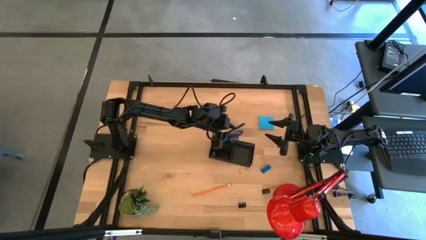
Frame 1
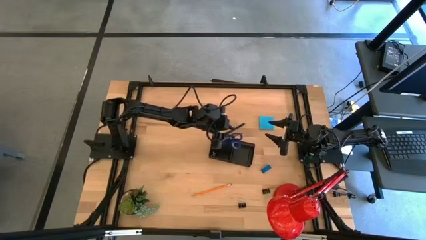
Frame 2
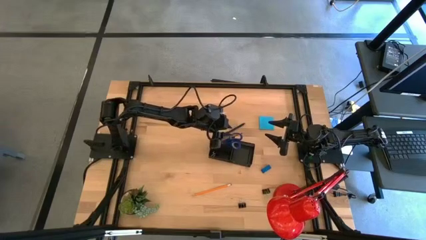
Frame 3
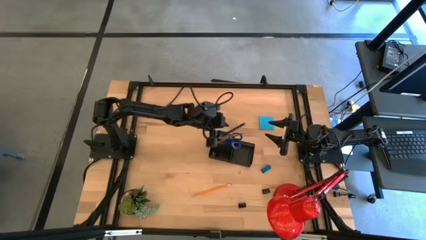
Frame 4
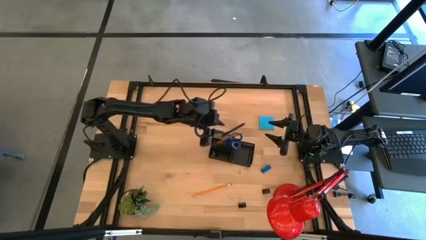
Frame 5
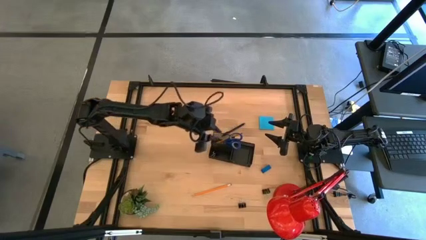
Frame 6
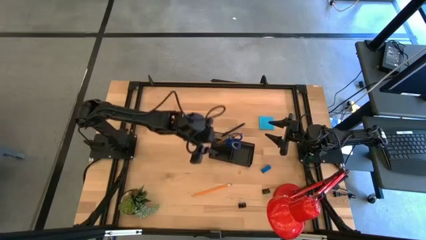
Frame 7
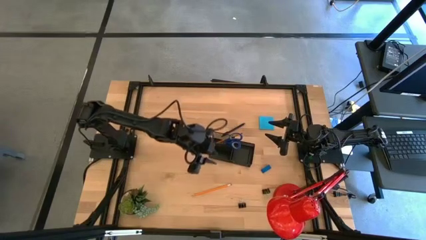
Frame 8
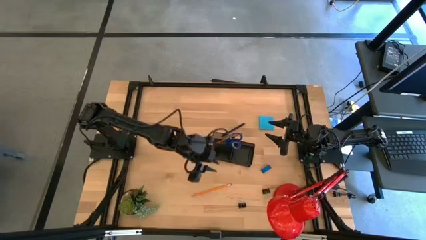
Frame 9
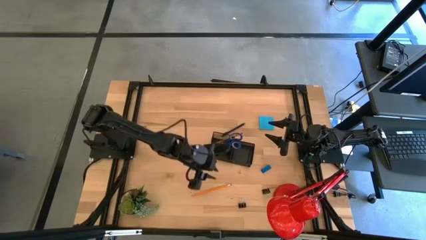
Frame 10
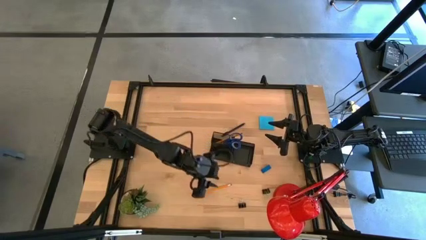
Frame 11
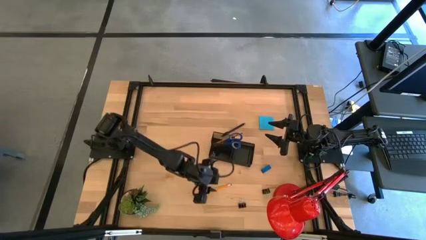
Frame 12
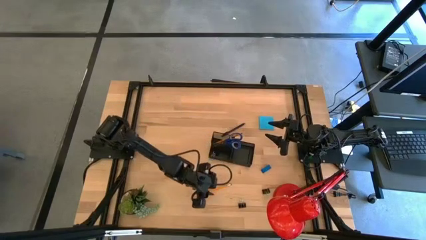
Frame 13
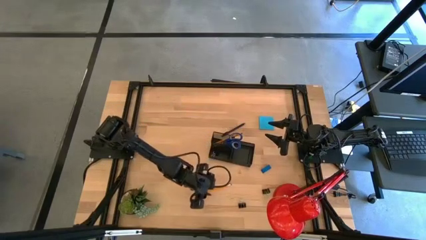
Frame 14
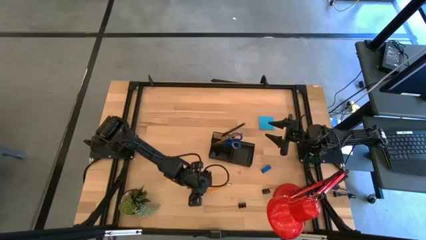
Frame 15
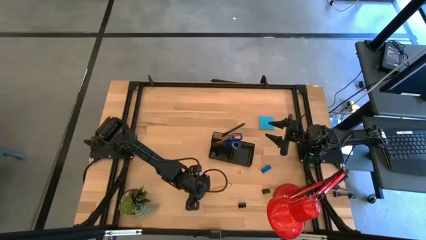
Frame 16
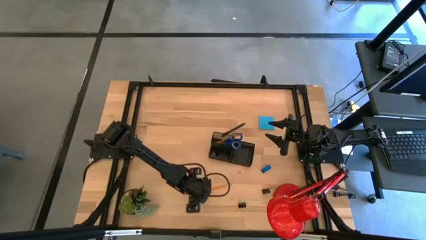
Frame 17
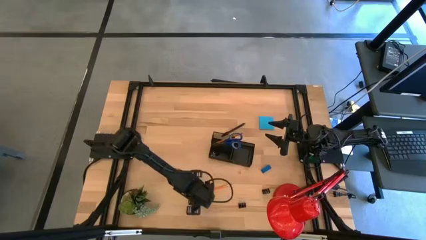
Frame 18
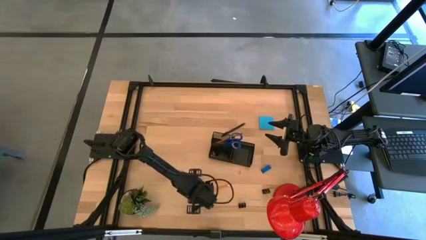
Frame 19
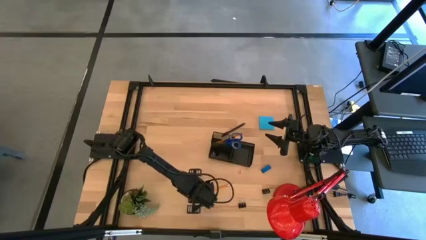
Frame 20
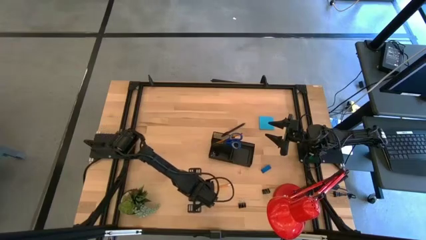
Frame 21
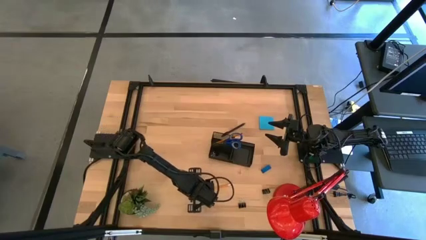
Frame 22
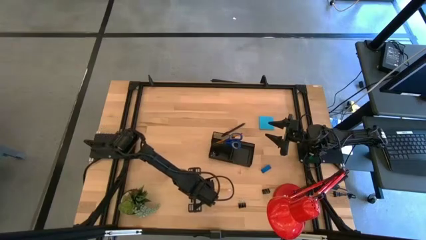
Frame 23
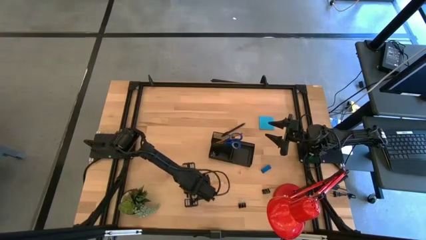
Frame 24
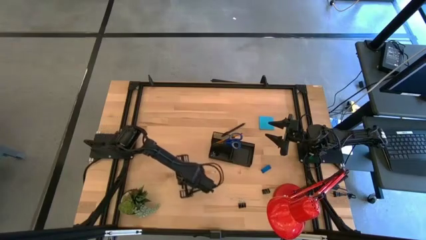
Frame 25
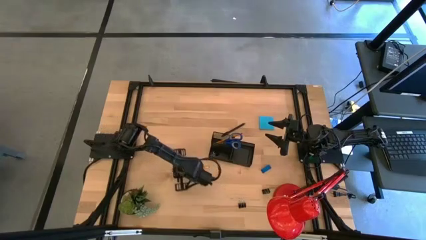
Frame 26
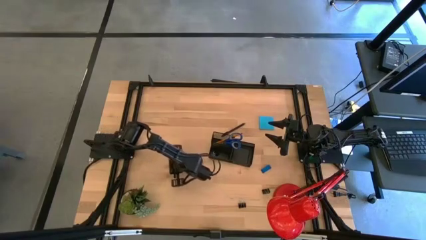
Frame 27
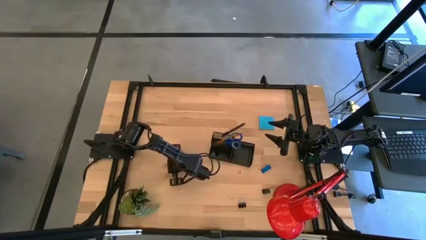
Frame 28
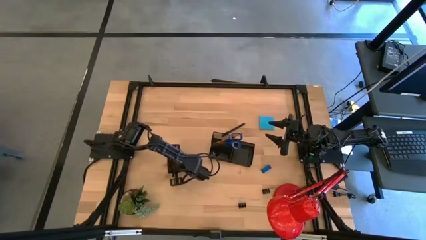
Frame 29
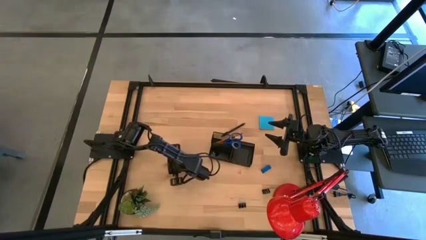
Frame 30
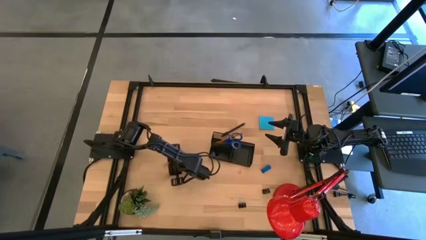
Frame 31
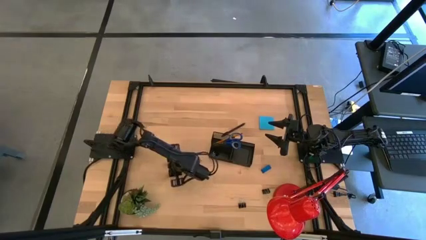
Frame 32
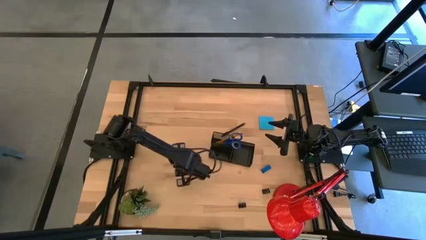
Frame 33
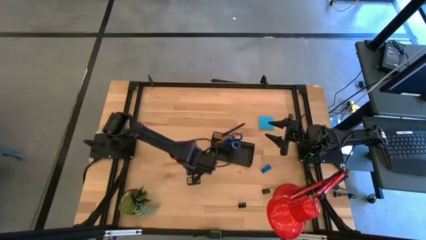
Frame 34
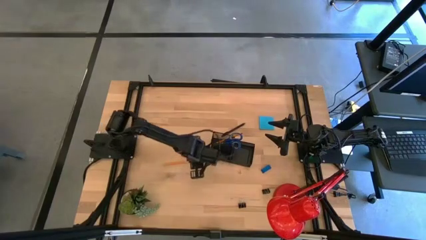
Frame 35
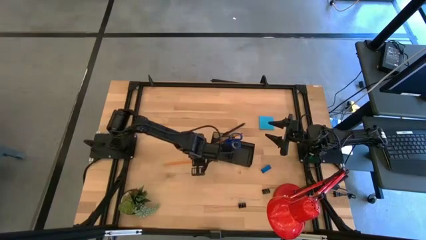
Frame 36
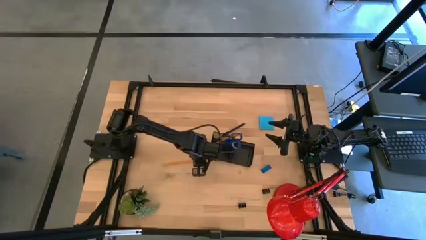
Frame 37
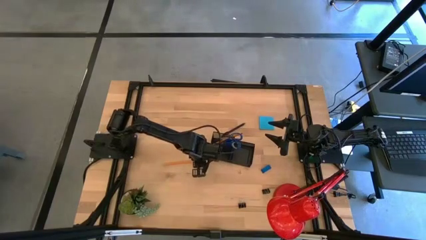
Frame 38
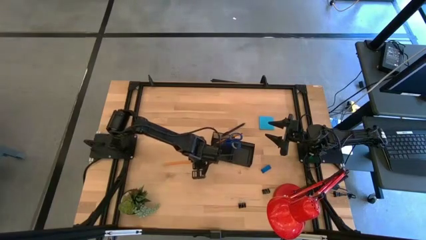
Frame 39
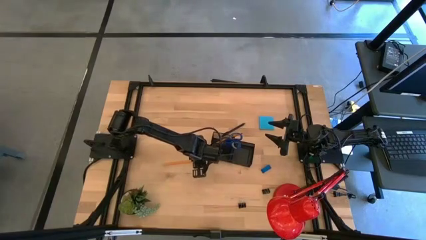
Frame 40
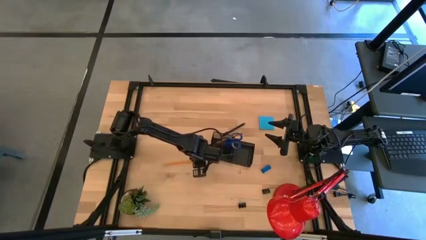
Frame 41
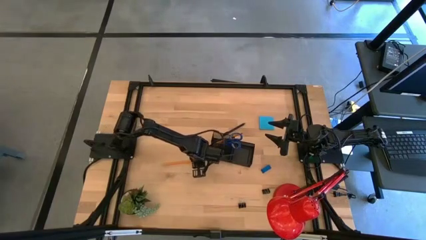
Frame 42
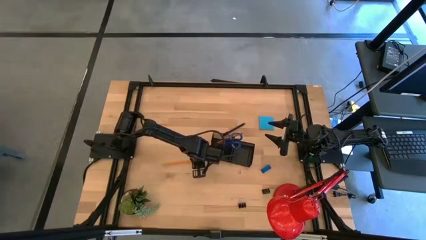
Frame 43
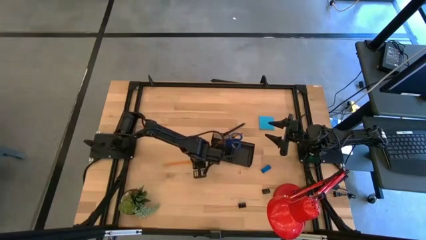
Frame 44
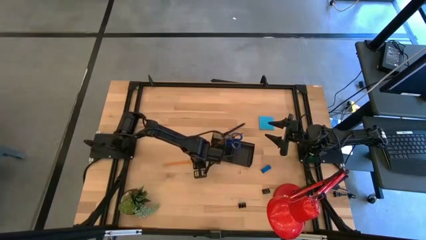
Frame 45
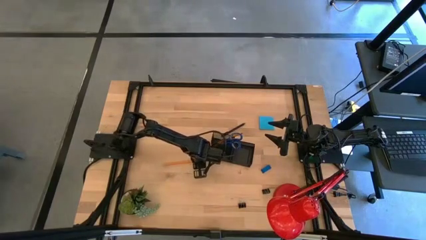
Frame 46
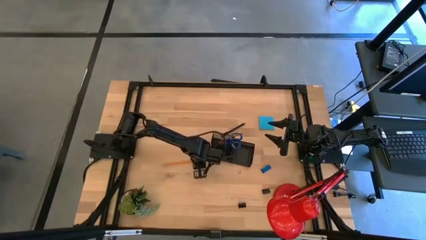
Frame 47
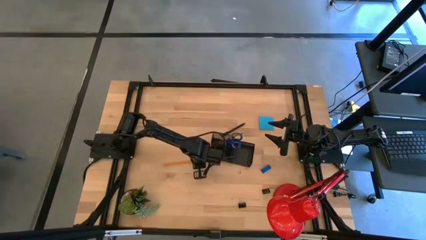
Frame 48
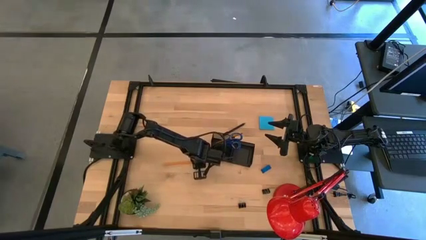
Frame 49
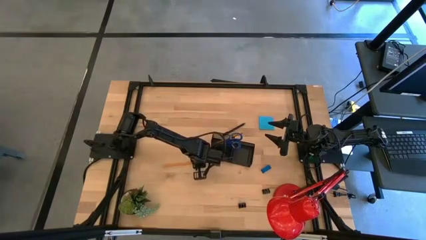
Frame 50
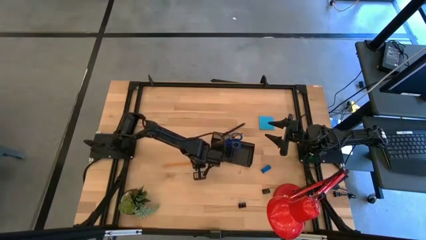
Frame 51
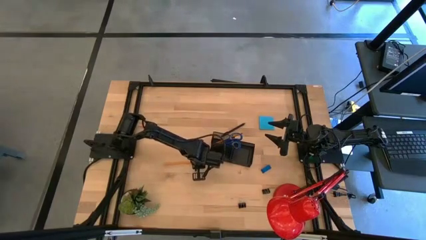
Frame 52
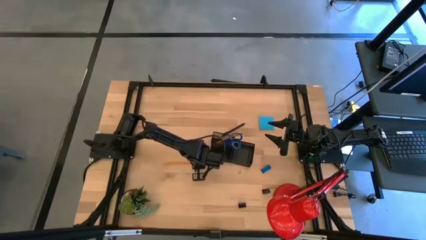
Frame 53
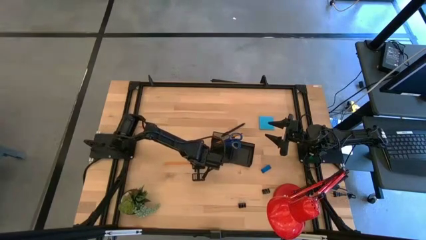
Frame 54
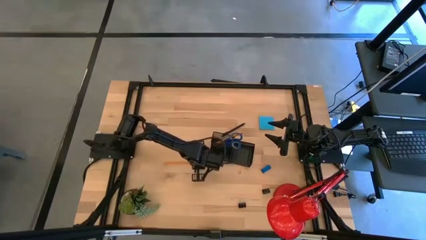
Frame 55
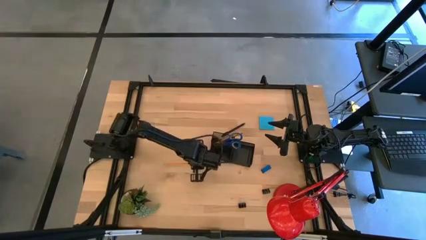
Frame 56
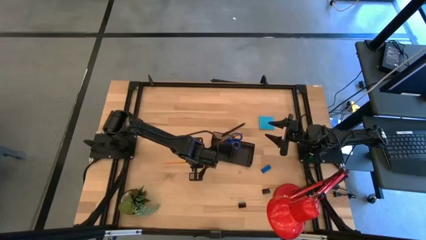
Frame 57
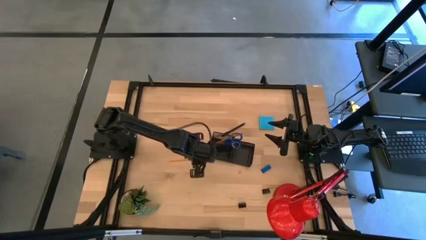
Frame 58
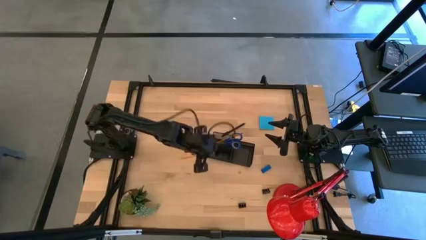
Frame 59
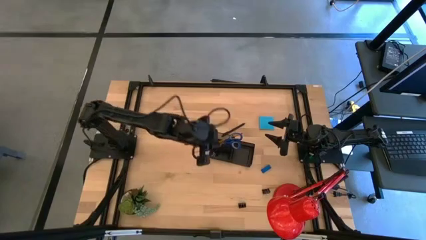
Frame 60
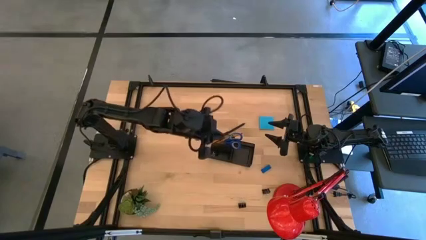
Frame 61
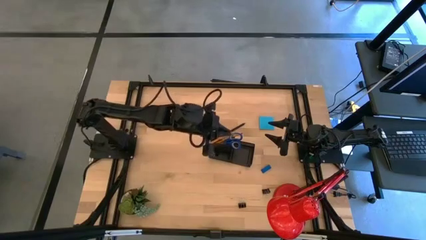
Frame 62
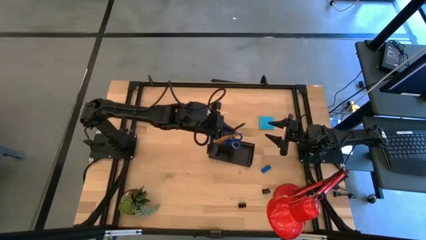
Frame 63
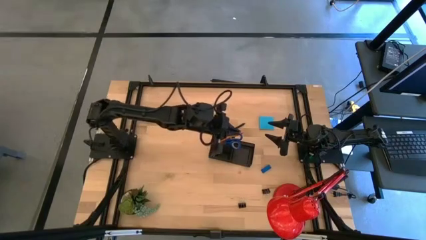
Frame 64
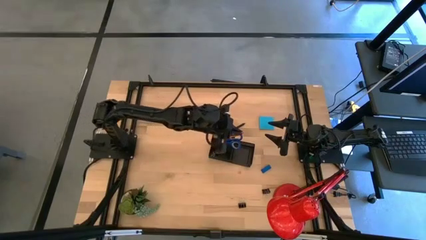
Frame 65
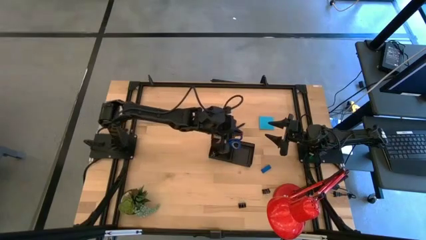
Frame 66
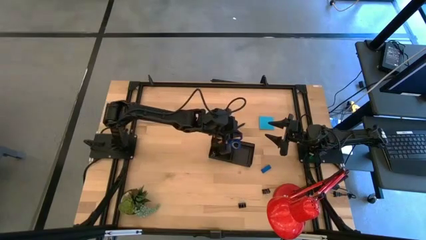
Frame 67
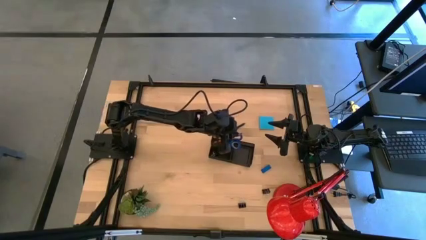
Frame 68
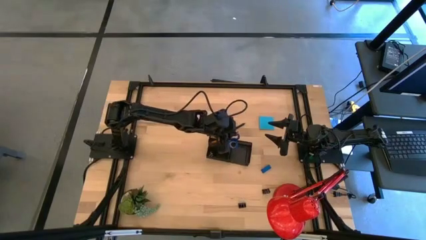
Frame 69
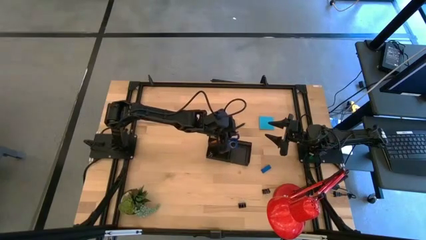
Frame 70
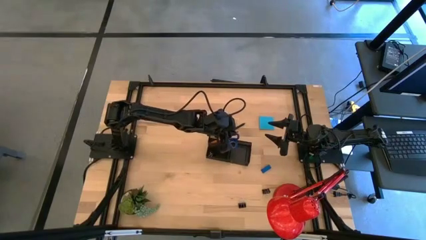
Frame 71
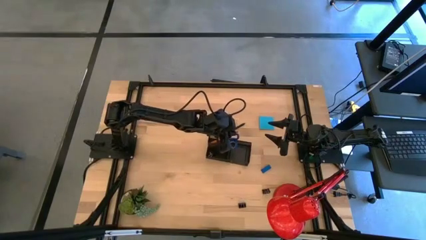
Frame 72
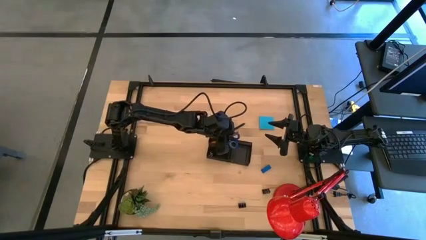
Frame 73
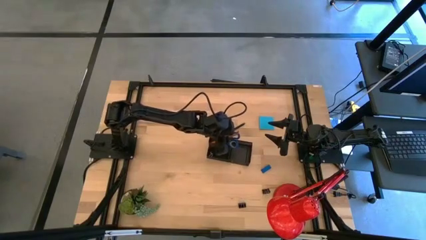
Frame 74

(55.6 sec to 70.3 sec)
Task: Pick and place office supplies into organizer
Put the yellow pencil into the black desk organizer

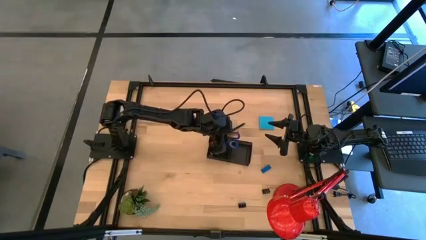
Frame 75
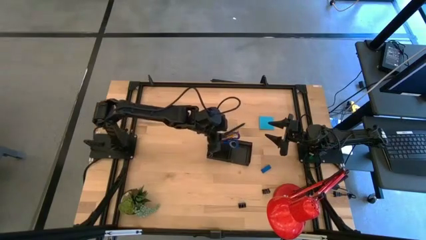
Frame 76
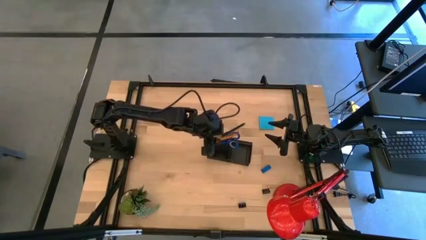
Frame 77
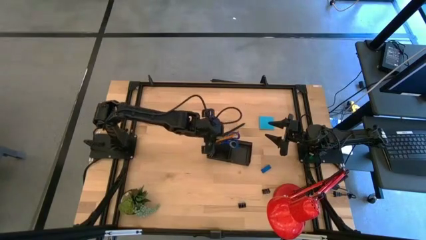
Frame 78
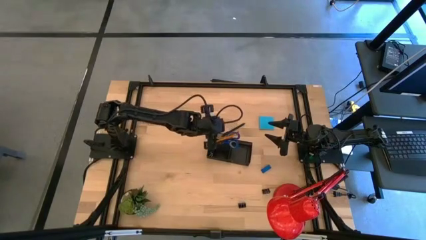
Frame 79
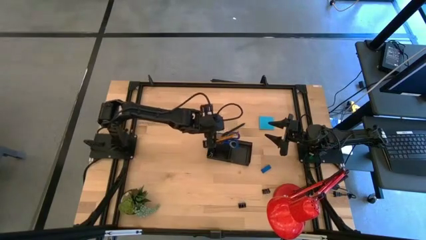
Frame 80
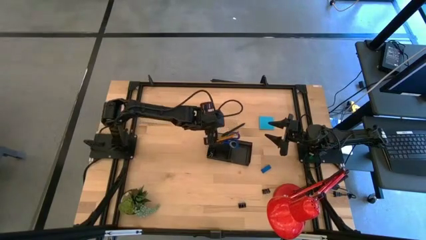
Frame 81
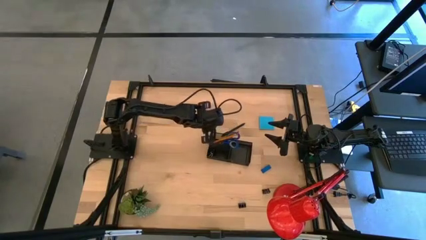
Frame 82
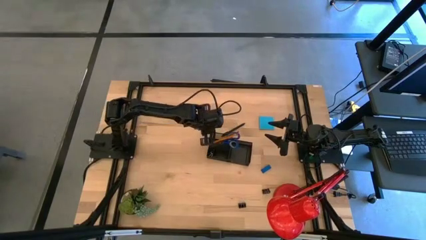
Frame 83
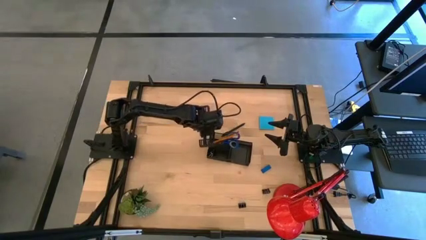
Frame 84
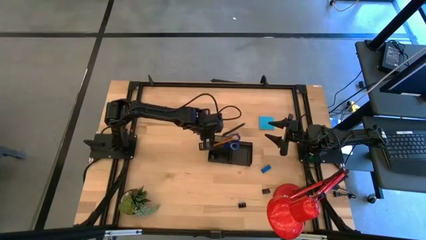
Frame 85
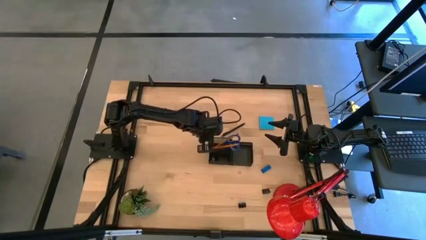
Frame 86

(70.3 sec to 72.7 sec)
Adjust the black desk organizer
